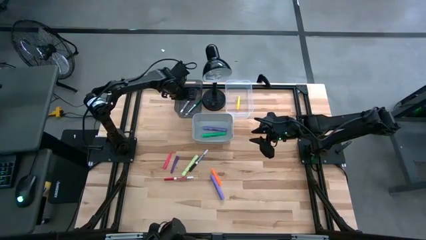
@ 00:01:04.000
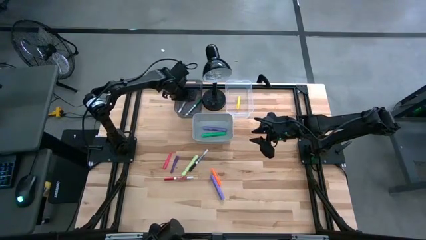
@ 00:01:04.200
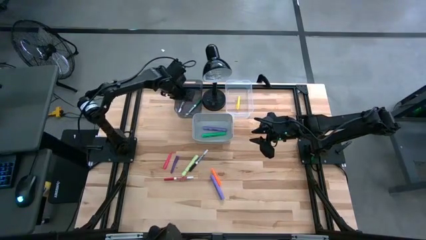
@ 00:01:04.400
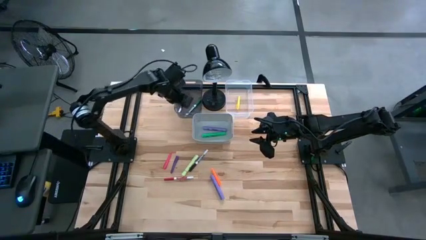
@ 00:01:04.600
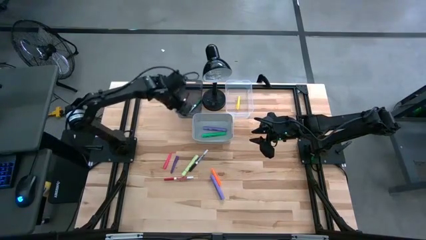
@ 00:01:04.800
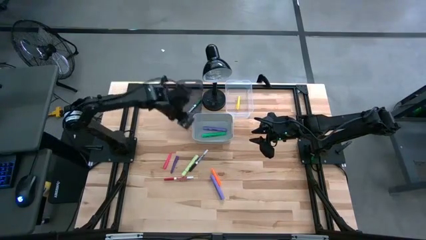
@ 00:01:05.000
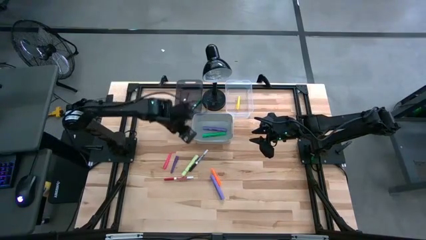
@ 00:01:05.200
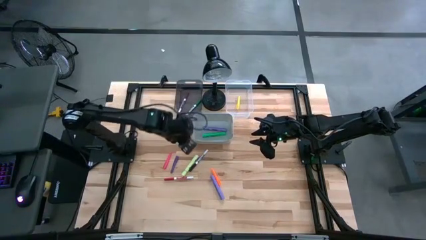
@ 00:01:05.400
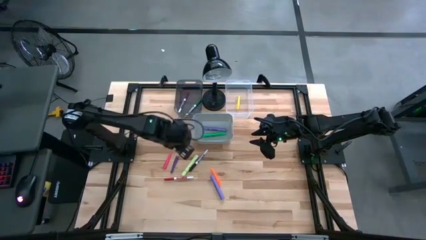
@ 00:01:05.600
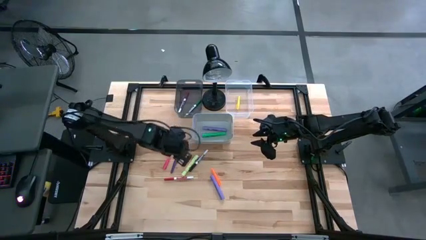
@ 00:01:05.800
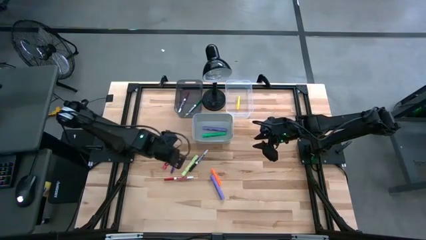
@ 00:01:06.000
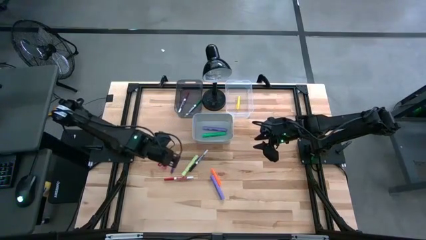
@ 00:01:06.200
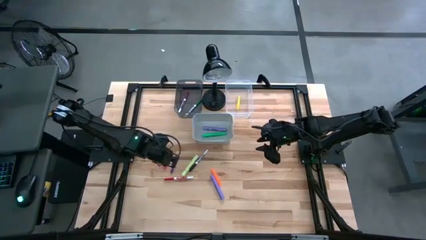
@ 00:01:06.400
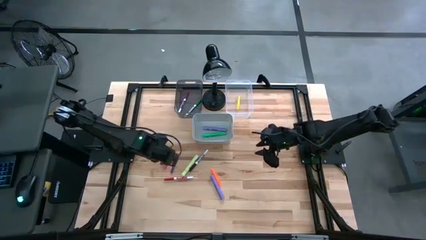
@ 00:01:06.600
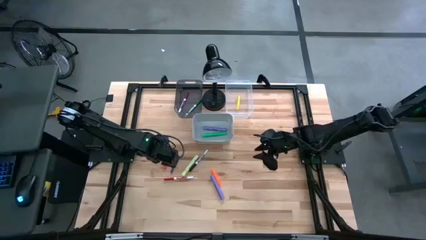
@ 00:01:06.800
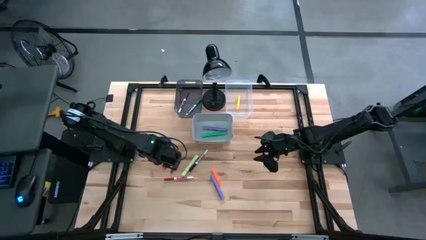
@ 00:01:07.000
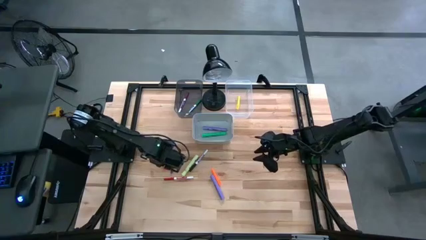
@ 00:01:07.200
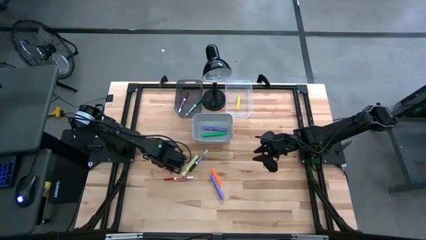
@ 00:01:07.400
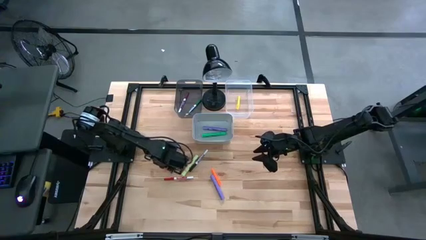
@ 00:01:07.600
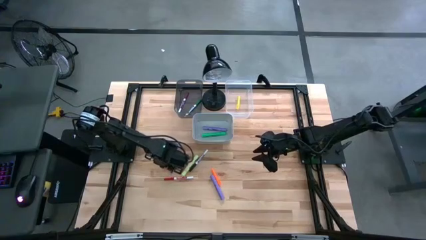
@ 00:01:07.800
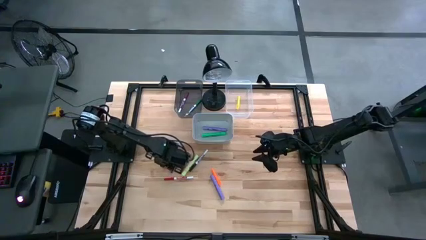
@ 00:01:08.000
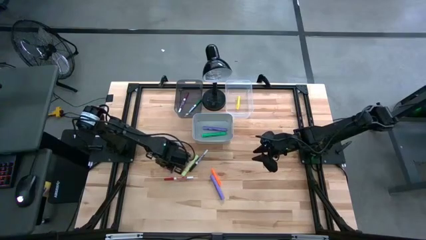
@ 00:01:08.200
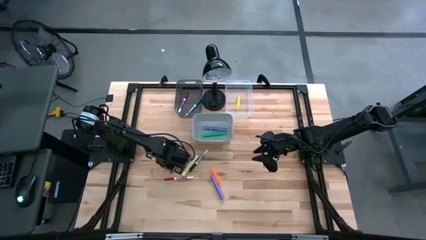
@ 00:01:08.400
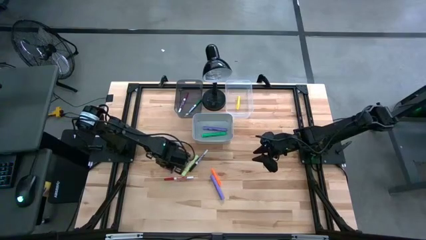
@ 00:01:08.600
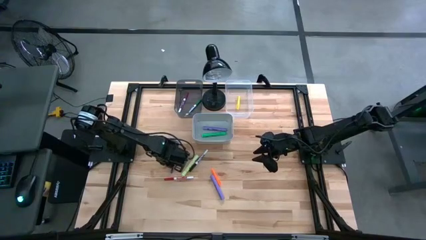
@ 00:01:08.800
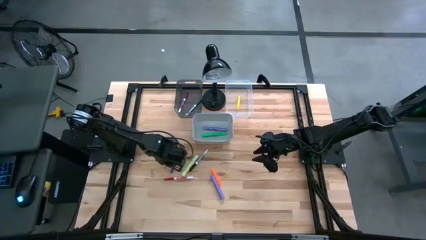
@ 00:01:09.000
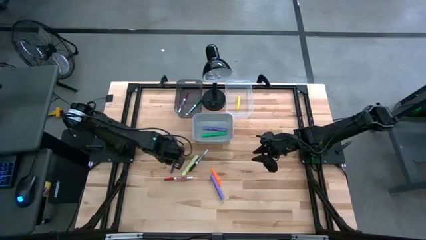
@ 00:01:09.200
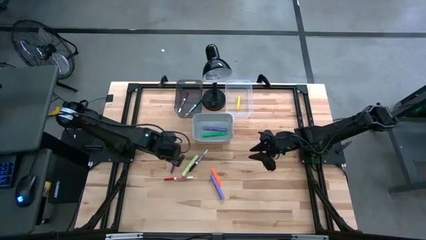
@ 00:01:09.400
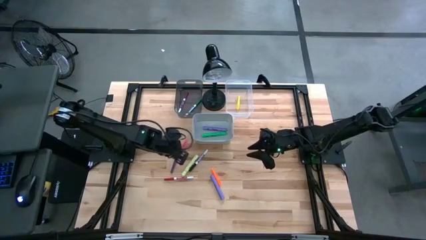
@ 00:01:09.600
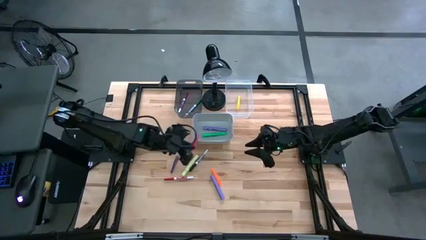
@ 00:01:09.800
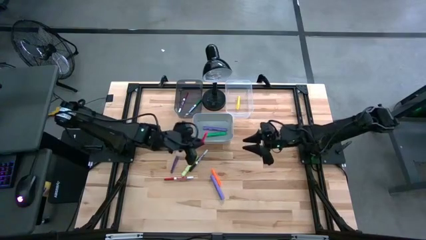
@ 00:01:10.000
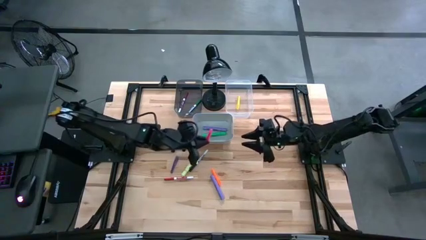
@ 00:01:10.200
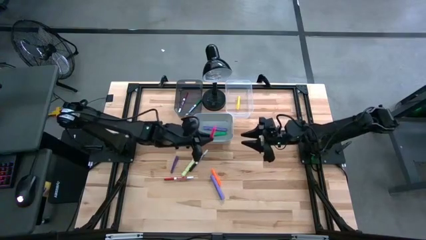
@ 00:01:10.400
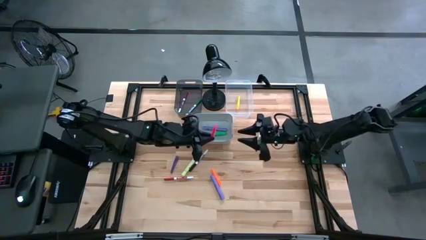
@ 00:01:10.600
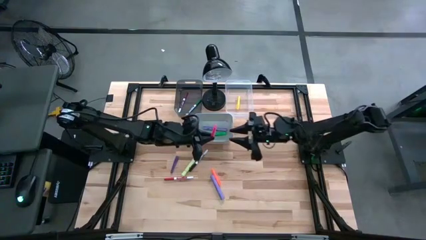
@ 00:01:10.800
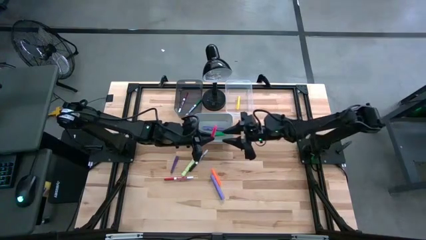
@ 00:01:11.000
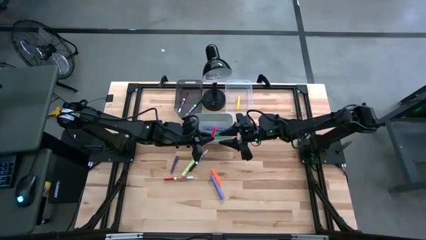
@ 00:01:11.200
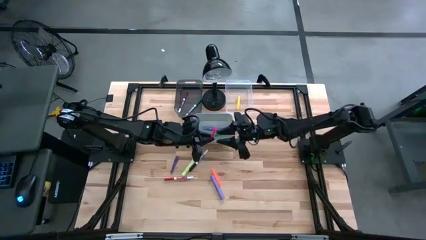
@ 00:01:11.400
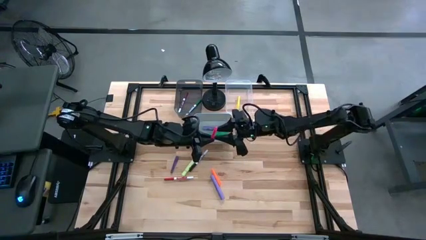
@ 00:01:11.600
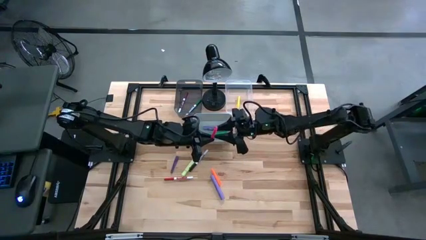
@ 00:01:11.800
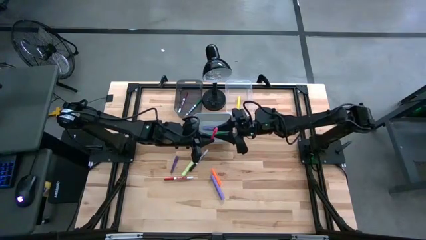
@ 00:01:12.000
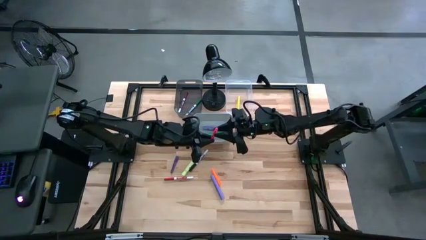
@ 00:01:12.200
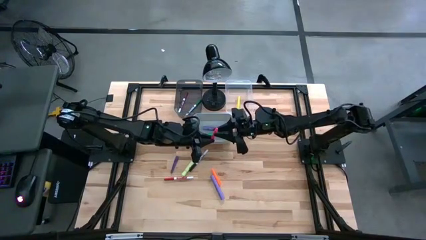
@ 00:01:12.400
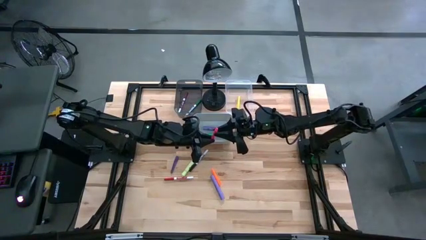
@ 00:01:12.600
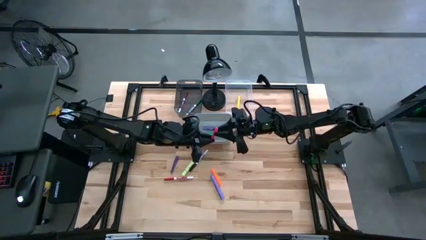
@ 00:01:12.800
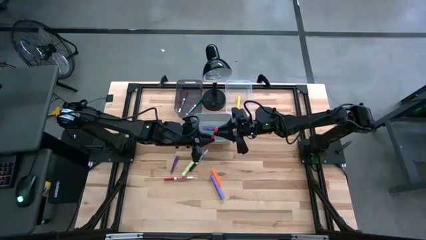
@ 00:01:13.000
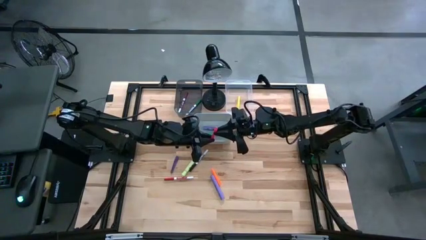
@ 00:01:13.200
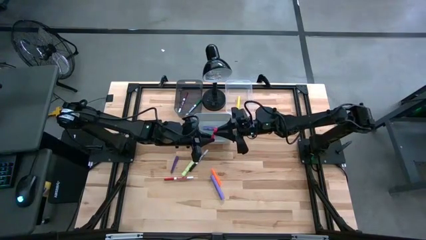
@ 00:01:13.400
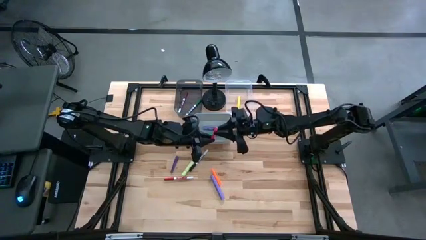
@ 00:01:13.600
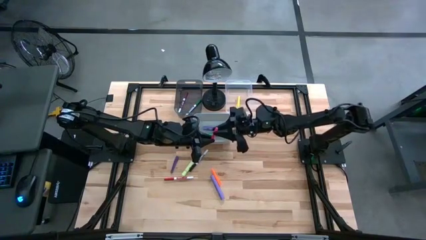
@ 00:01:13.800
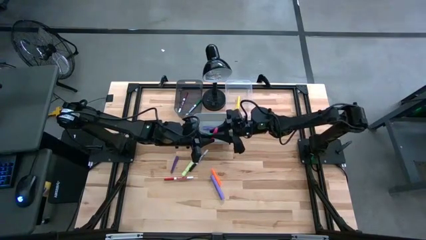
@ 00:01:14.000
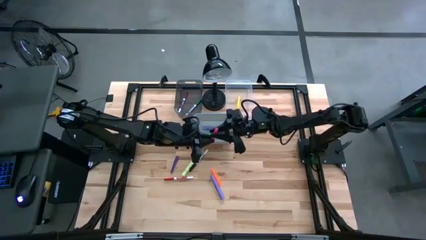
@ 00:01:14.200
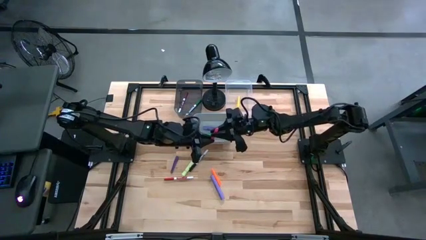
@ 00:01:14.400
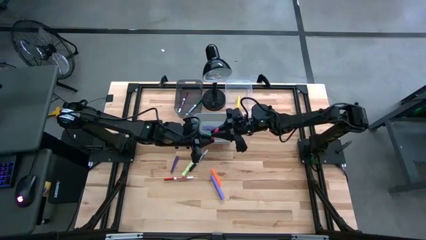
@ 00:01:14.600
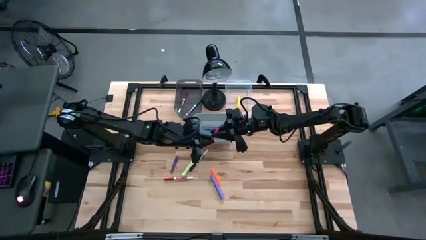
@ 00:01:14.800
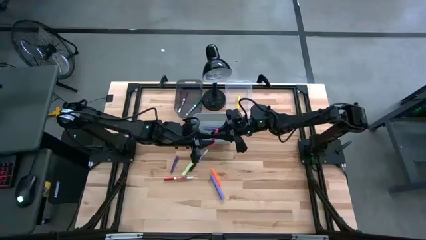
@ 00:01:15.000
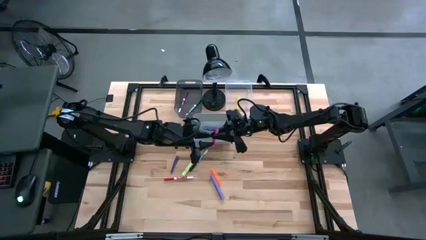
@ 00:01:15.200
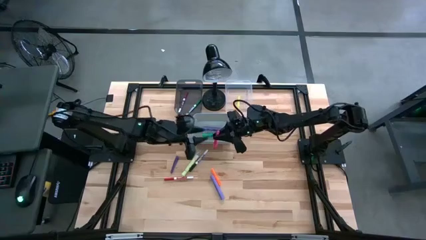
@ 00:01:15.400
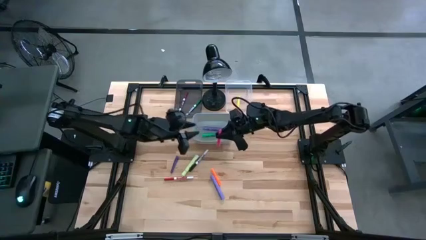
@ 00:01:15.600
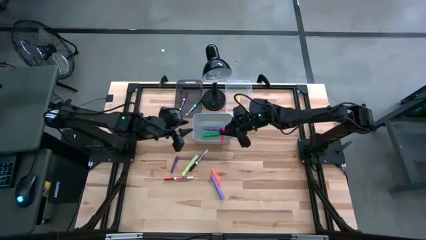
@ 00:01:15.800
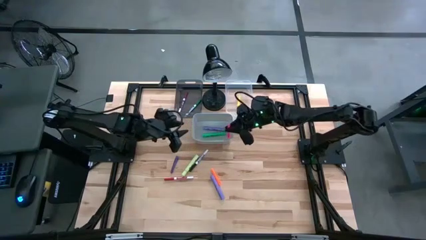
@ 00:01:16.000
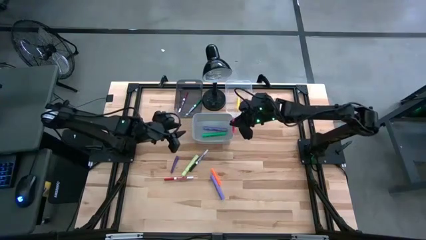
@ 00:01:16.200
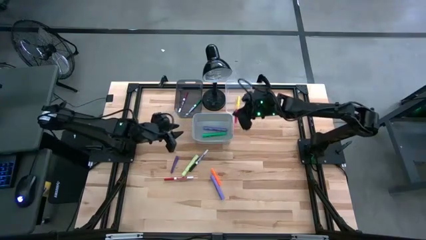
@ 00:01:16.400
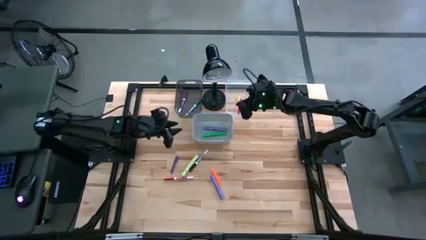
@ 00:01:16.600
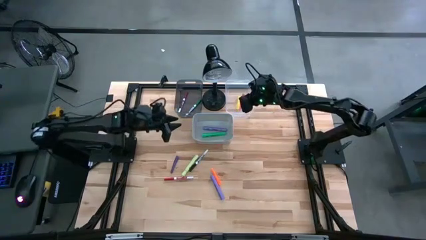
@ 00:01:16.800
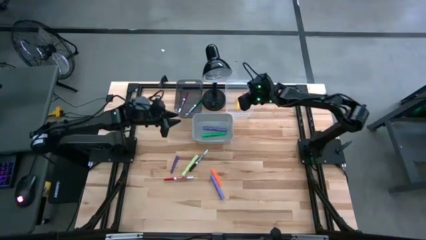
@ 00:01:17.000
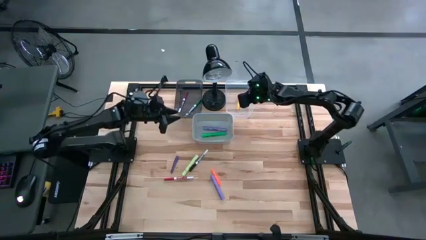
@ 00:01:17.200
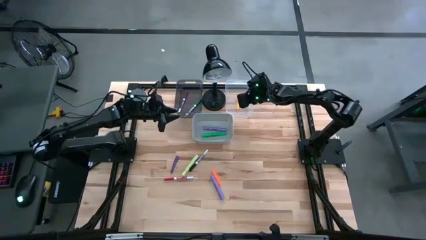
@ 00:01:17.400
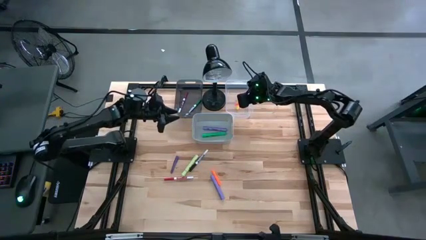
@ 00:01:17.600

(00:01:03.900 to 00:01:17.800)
Task: Pick & Place Markers
Put the small pink marker into the transparent bin
